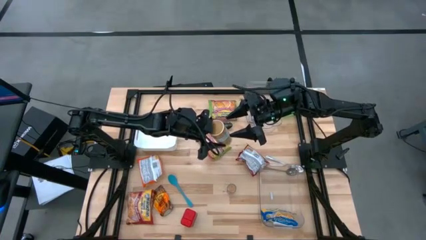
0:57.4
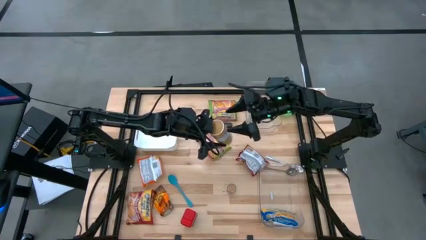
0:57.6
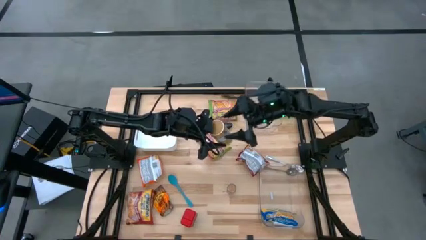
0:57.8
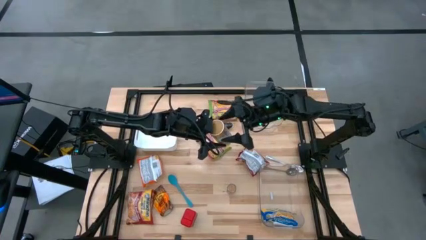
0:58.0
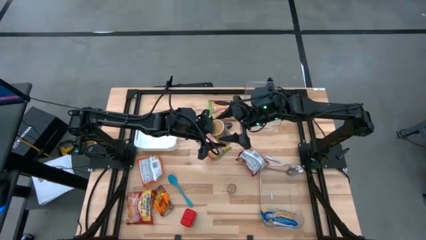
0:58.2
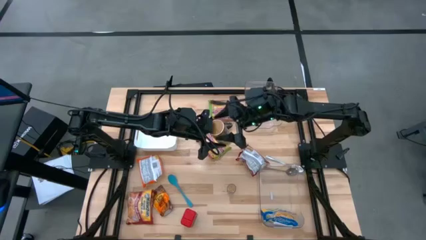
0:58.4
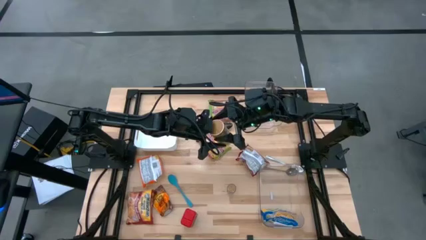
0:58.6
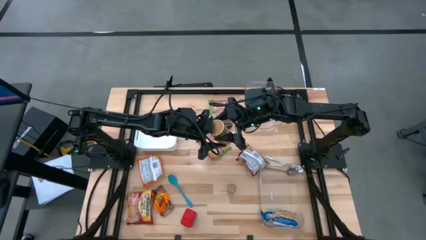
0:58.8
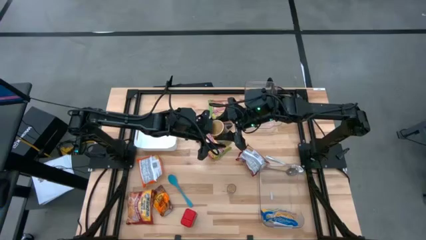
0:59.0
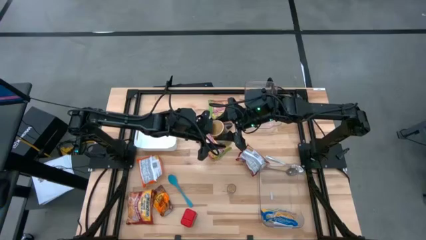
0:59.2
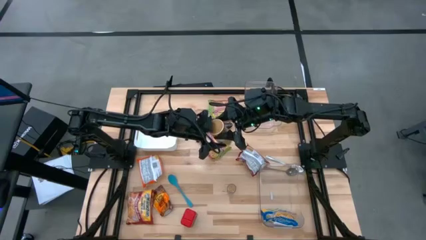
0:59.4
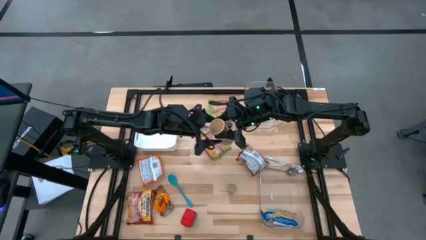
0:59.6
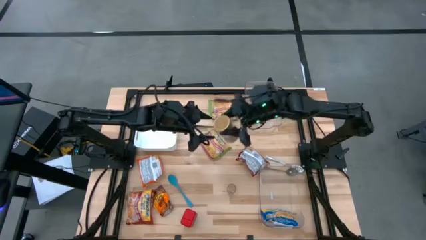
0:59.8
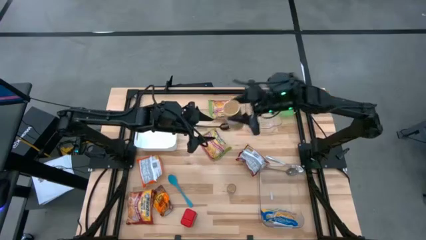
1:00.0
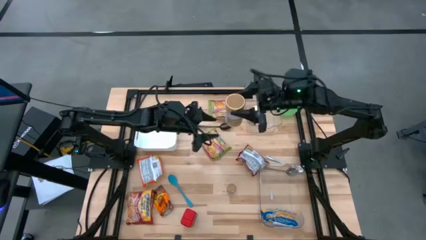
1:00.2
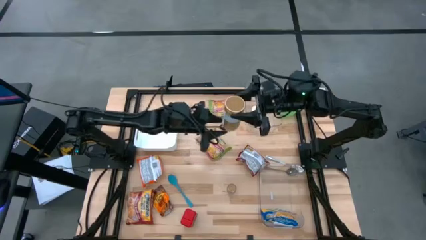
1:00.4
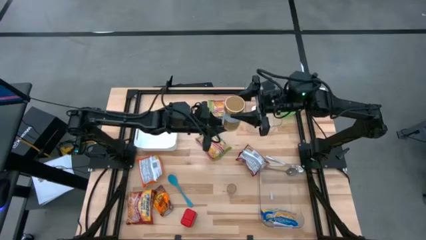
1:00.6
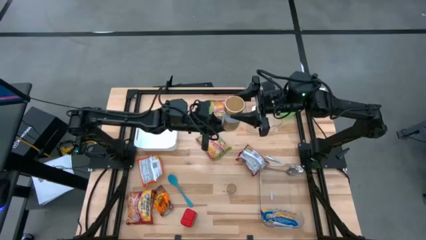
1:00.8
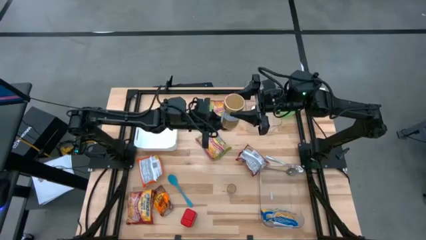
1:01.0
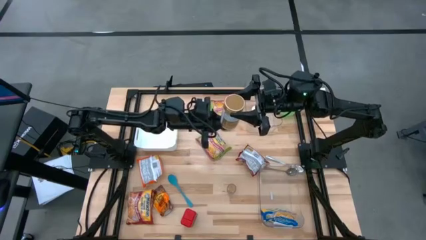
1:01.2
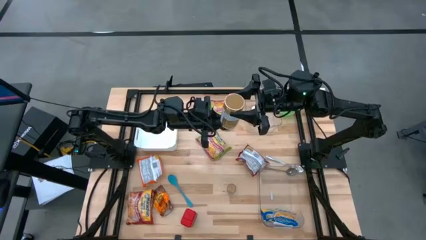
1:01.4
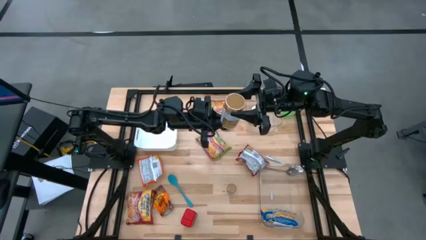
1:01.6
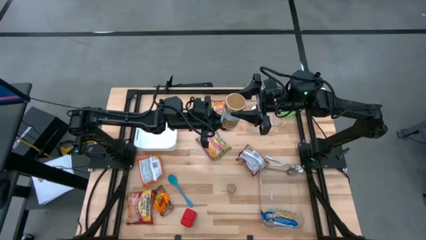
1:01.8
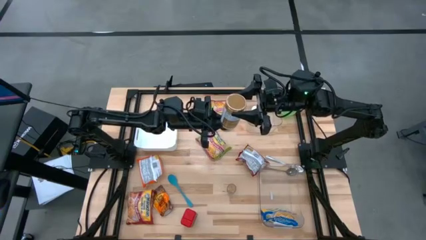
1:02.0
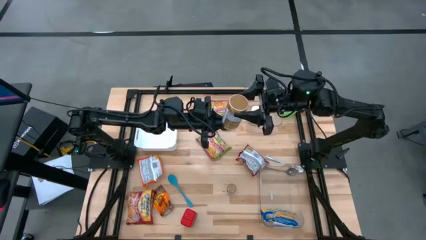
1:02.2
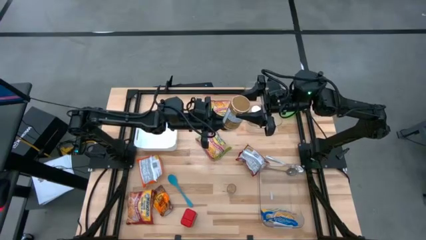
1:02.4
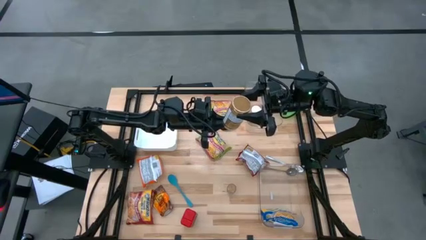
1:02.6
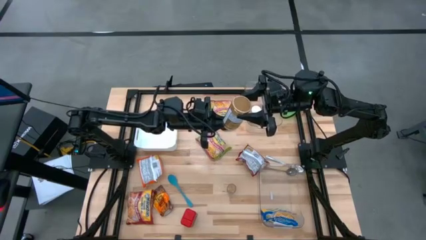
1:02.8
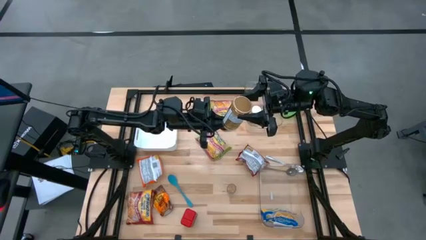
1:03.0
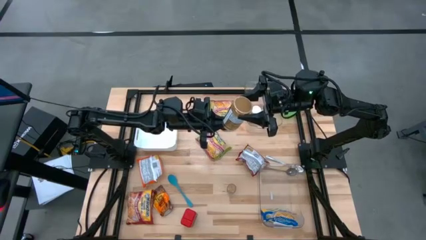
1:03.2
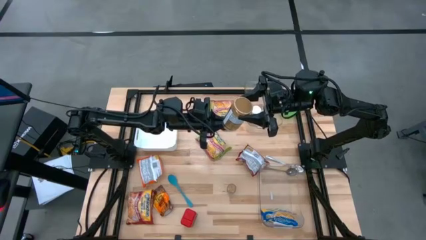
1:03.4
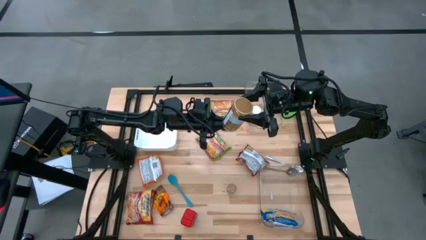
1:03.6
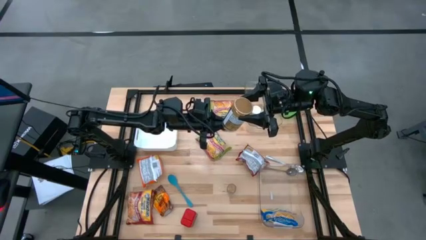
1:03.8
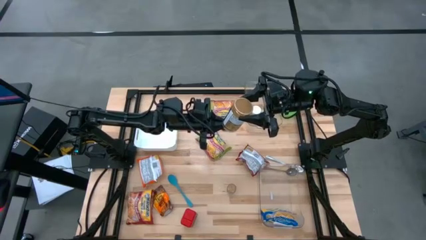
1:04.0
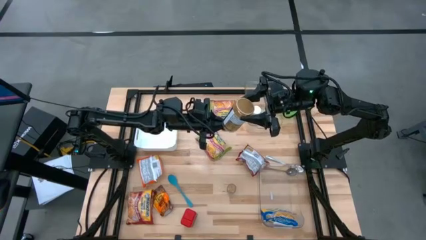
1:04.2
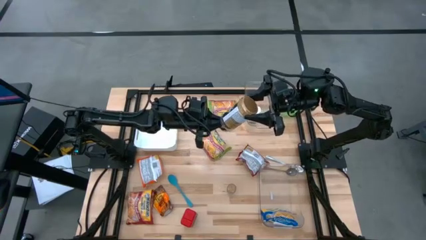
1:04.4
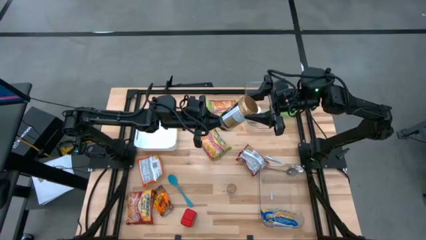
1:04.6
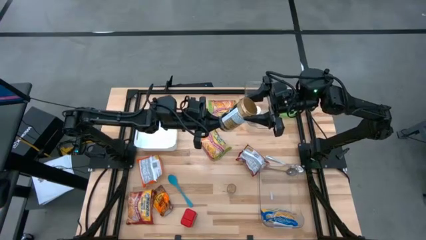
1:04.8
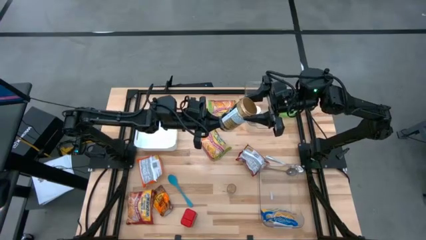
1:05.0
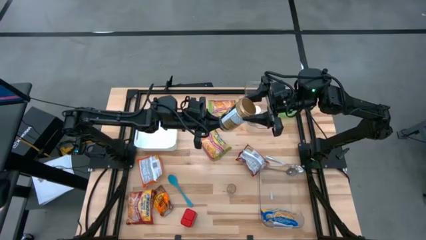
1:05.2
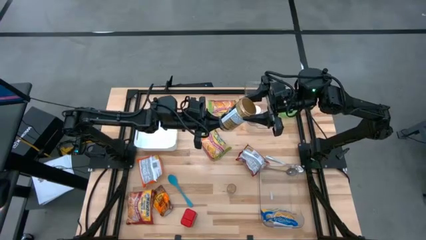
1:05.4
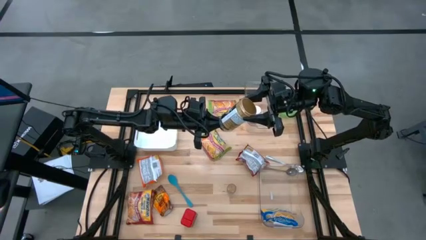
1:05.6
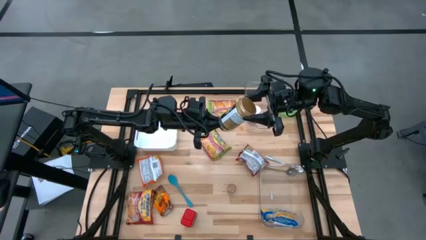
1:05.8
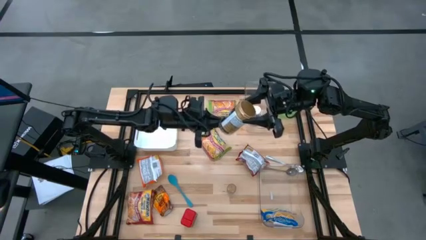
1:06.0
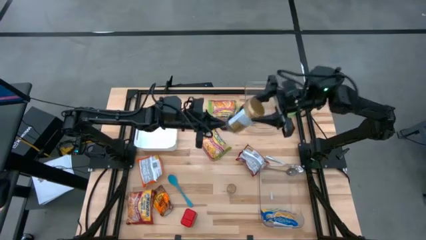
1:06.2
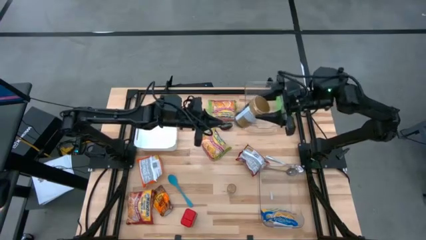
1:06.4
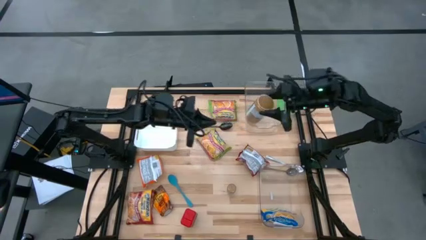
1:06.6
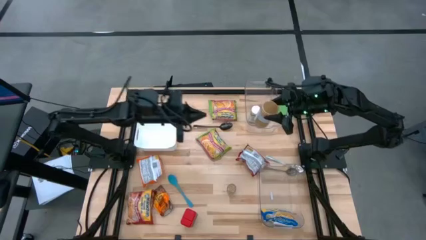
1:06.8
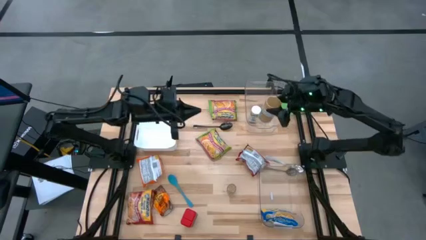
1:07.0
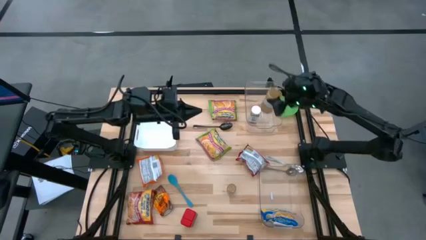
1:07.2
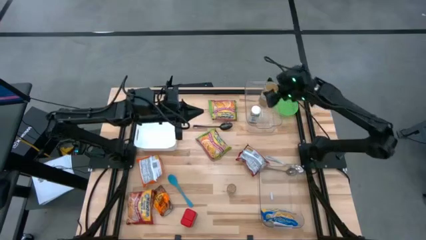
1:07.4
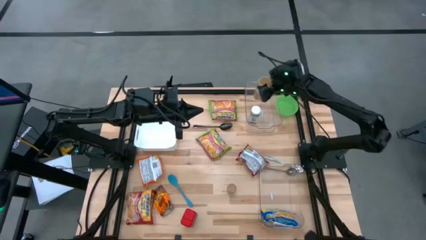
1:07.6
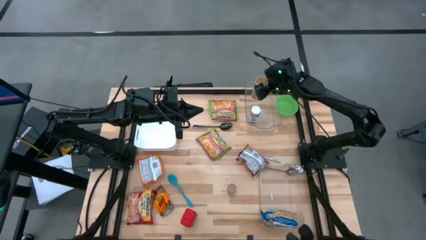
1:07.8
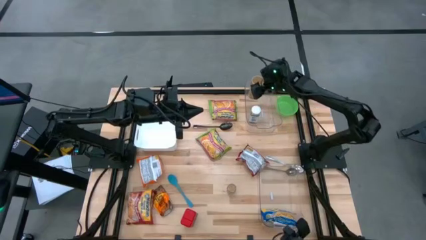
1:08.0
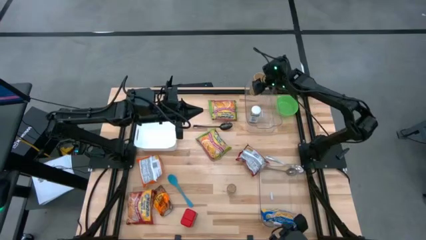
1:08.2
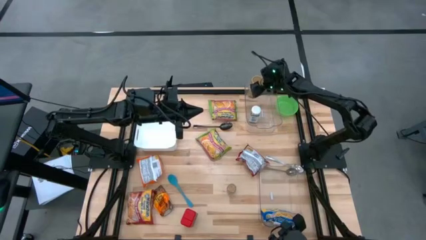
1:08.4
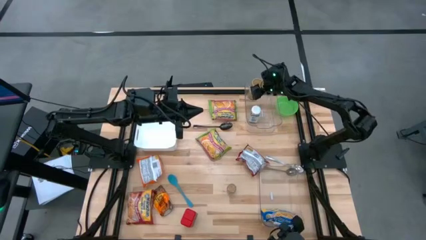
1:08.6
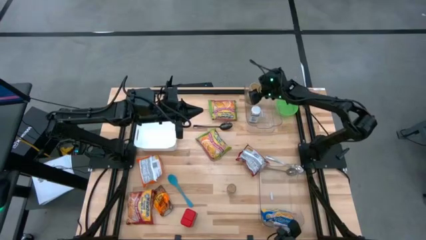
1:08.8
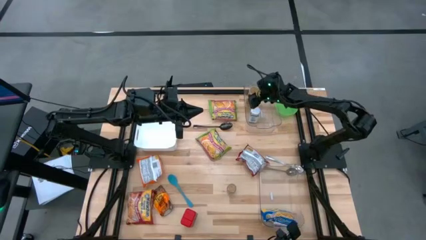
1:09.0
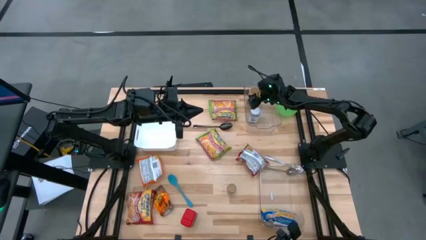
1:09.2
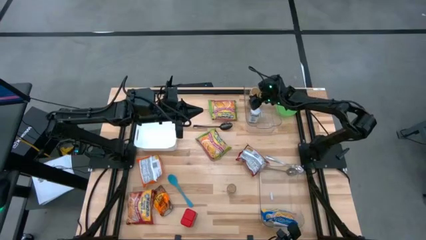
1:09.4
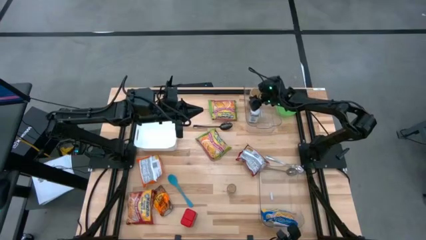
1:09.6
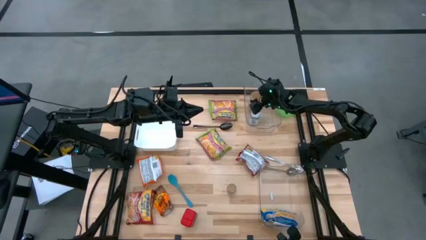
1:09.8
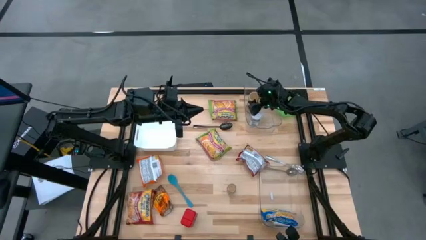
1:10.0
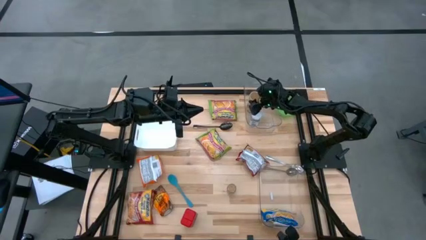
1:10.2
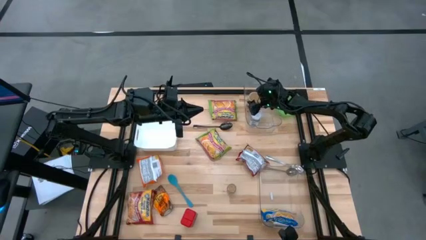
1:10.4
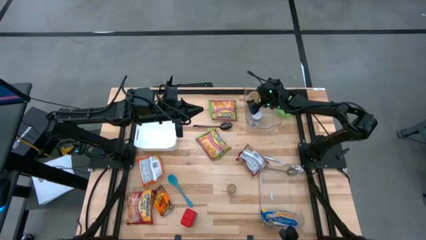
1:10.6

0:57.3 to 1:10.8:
Task: Pick & Place Food Item
Put the gold seasoning bottle into the top transparent bin
